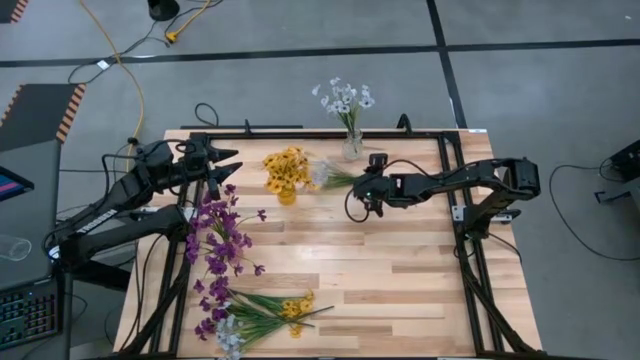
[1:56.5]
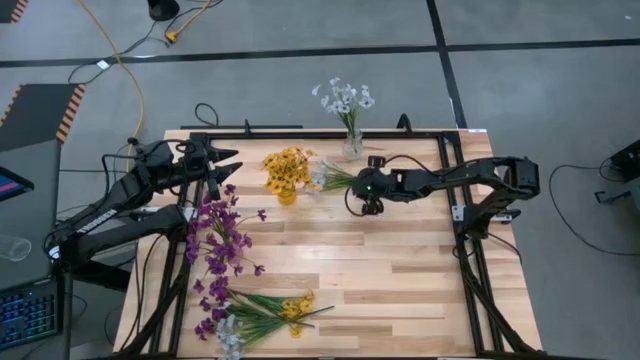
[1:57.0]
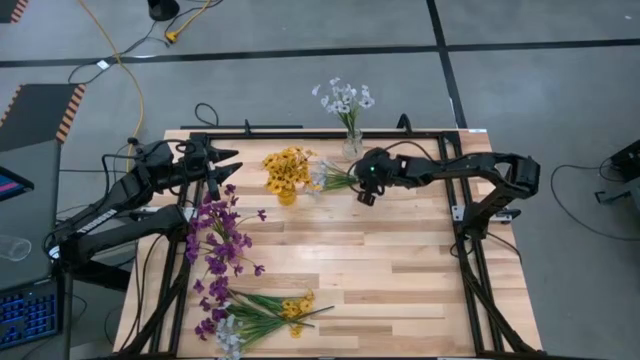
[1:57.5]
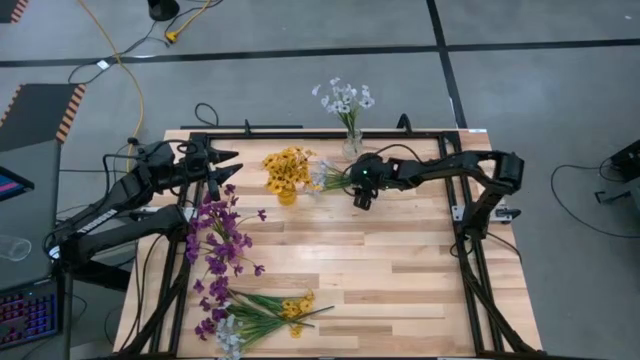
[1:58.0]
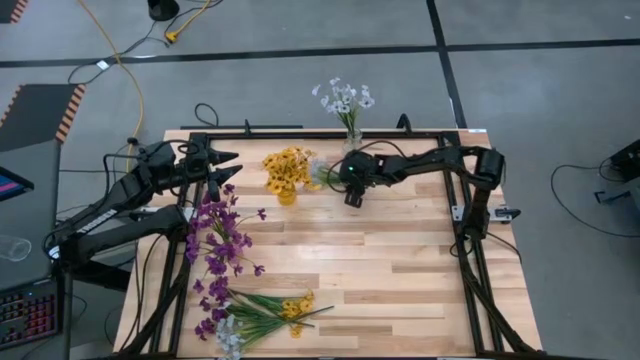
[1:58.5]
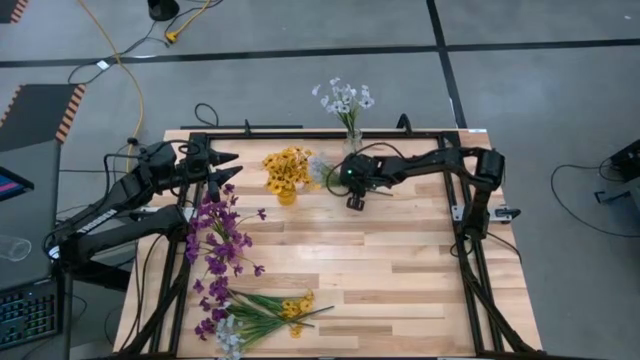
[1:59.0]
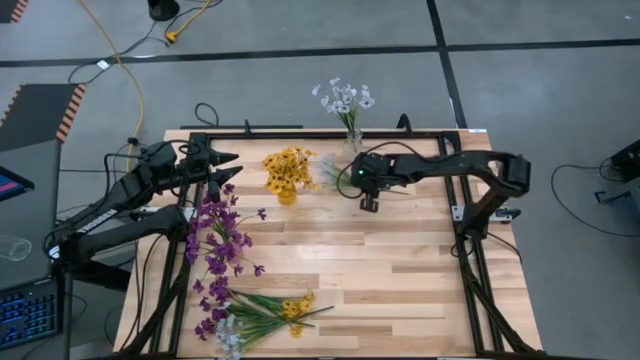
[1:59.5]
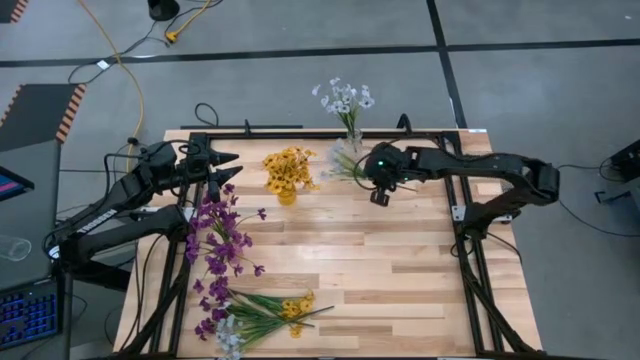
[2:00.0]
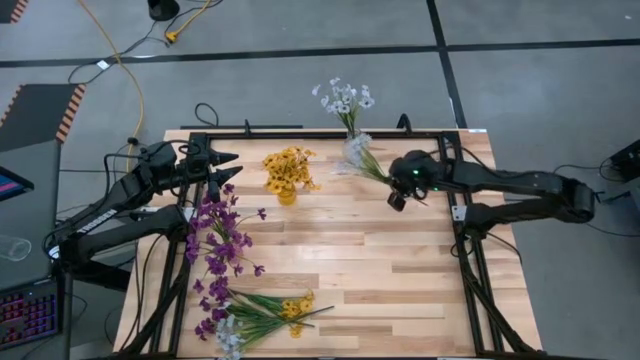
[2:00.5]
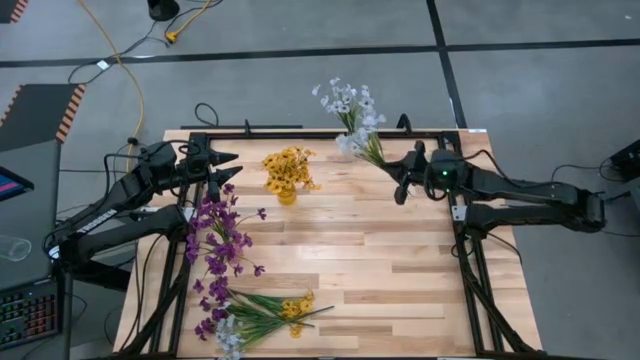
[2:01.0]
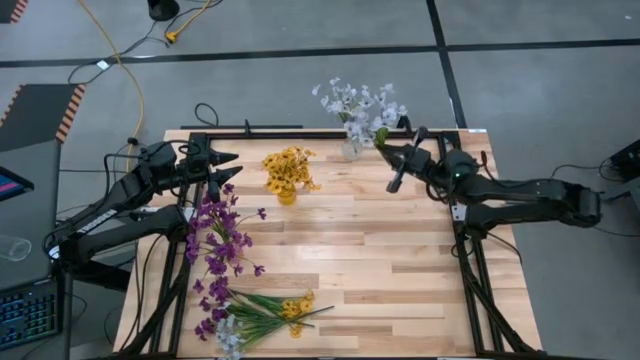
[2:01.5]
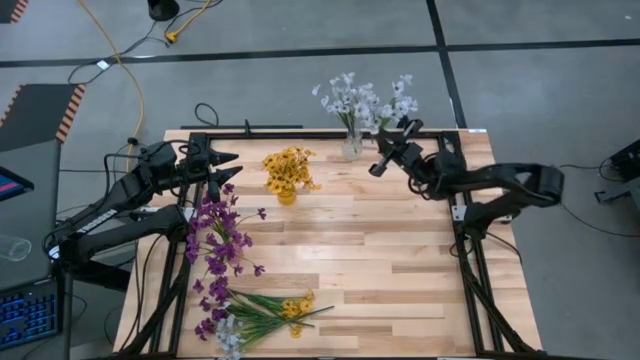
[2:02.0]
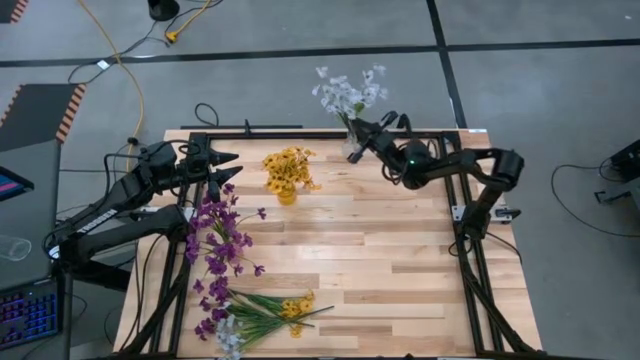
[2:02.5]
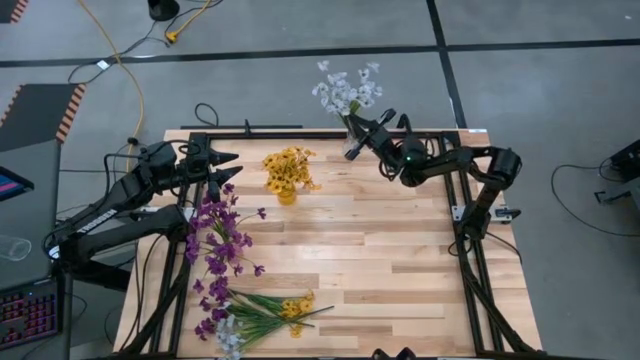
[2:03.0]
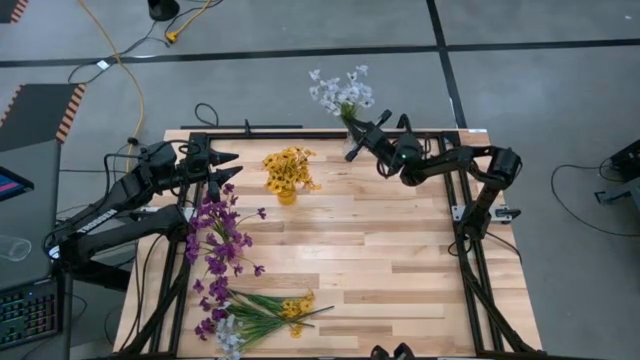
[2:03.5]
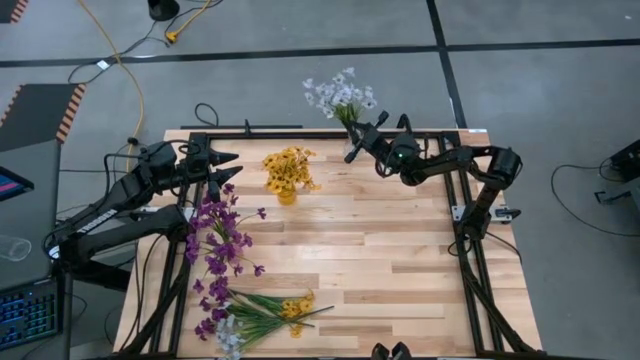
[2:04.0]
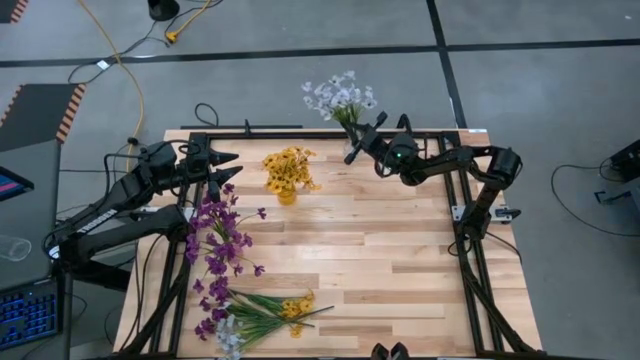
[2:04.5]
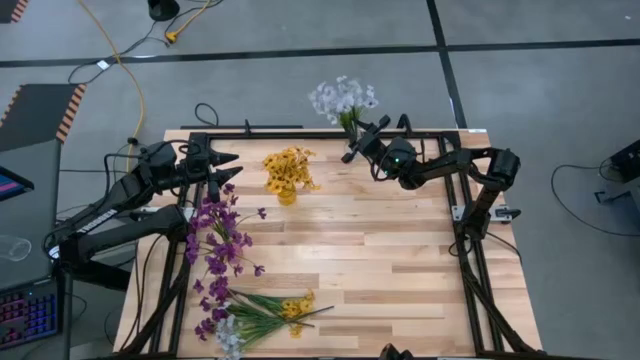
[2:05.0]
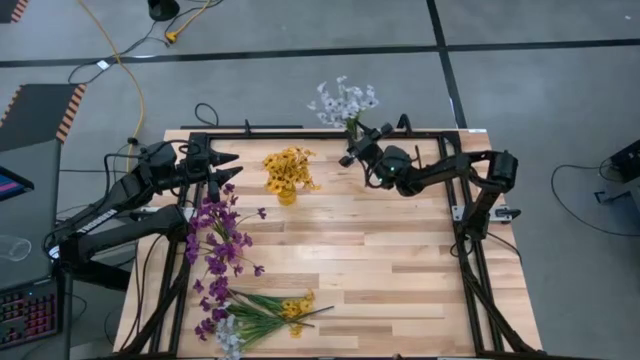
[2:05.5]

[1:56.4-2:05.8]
Task: Sort flowers into vase by color
Put the top white flowers into the transparent vase

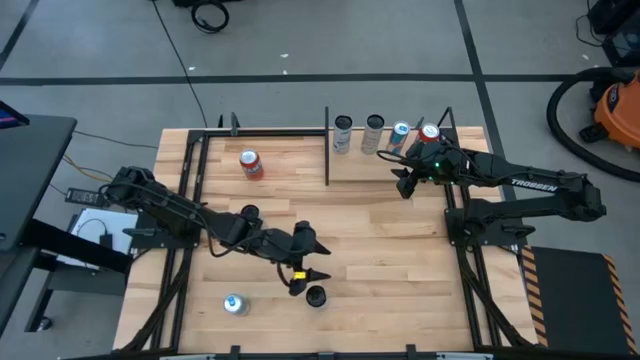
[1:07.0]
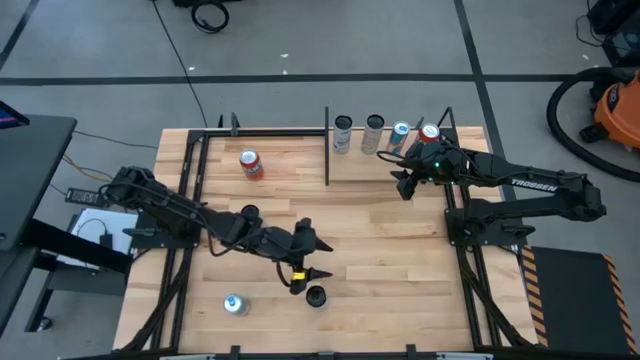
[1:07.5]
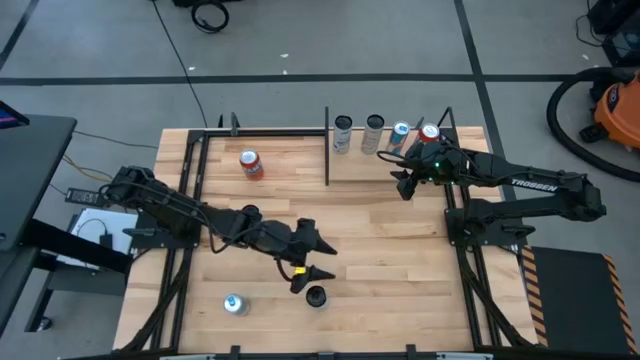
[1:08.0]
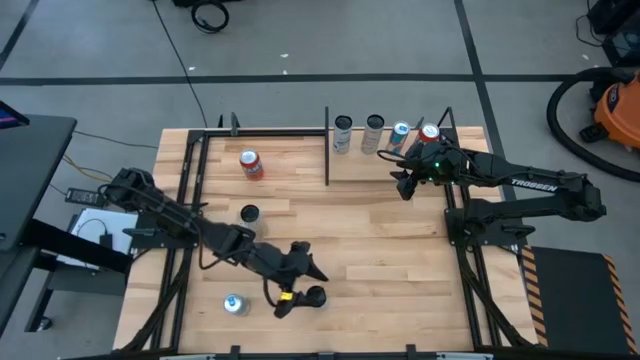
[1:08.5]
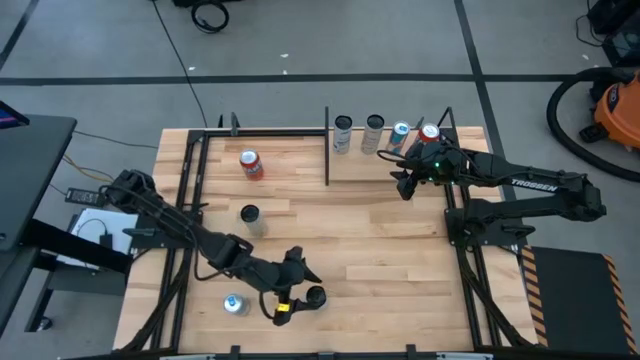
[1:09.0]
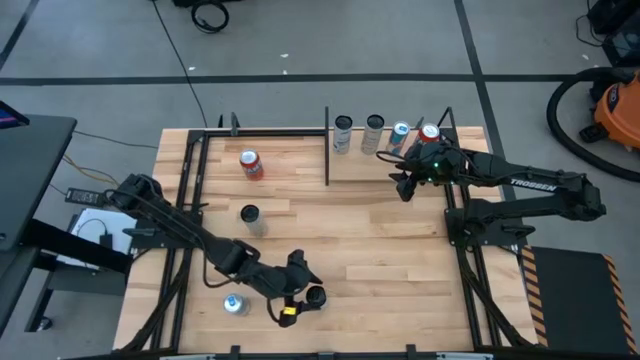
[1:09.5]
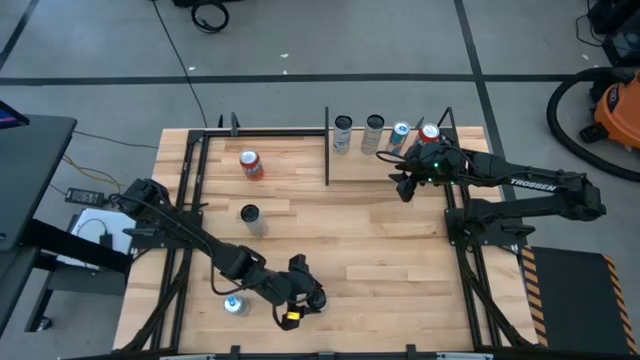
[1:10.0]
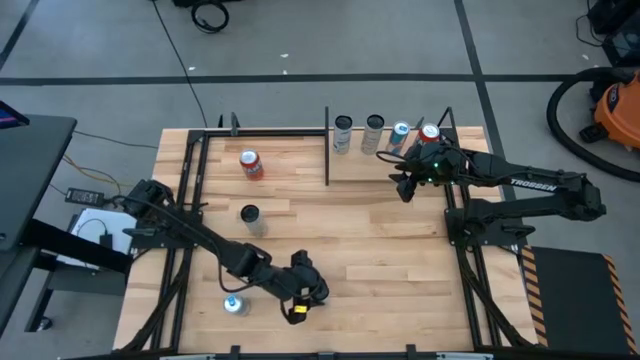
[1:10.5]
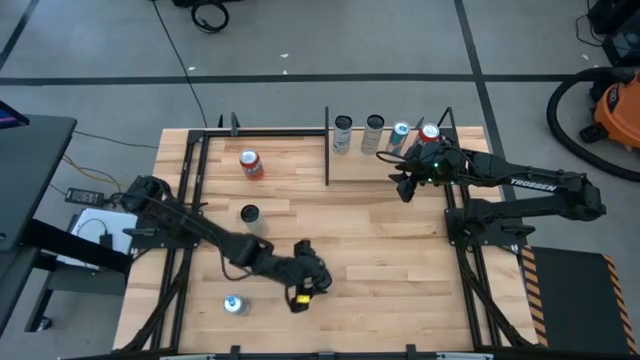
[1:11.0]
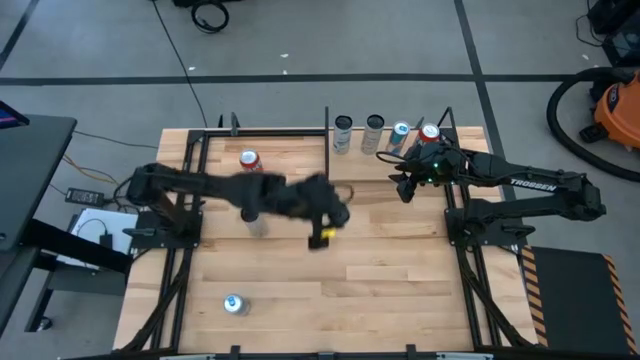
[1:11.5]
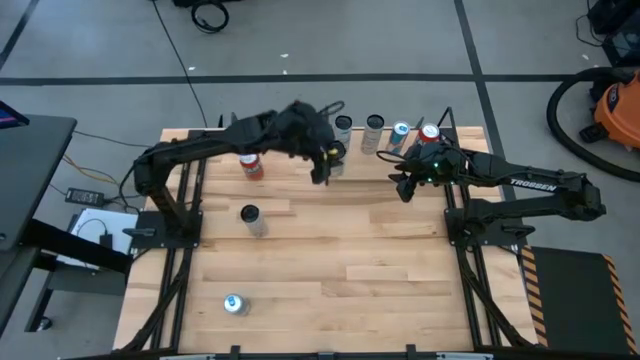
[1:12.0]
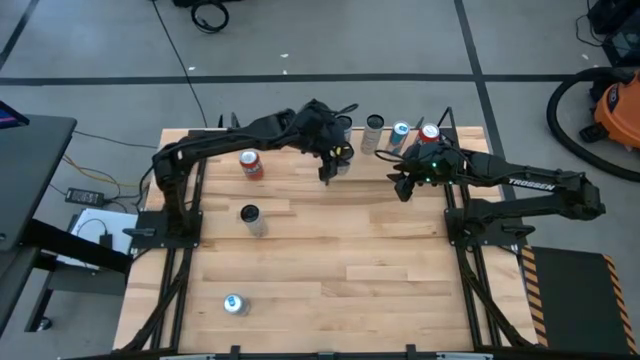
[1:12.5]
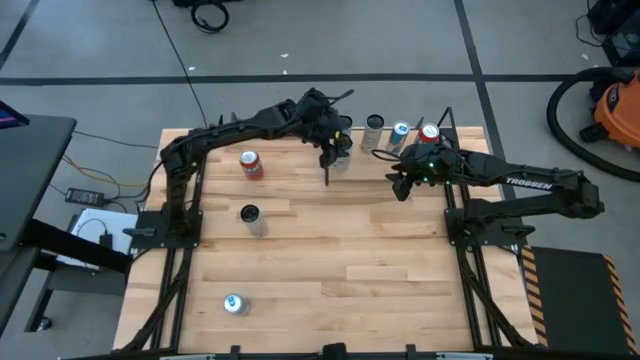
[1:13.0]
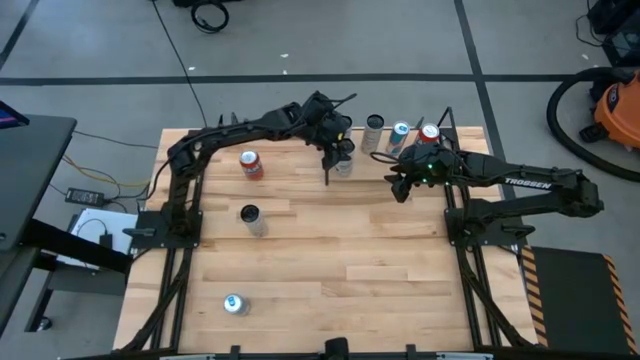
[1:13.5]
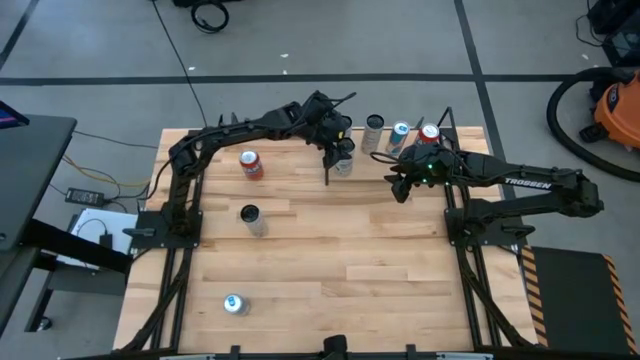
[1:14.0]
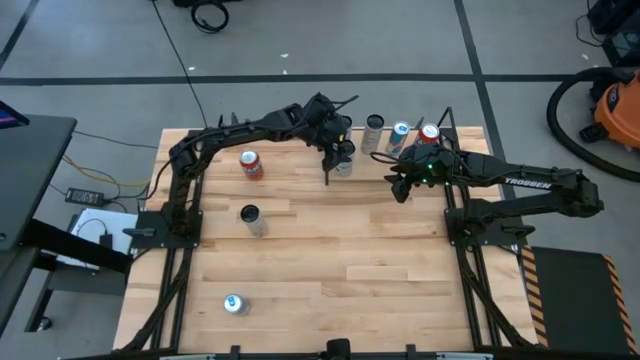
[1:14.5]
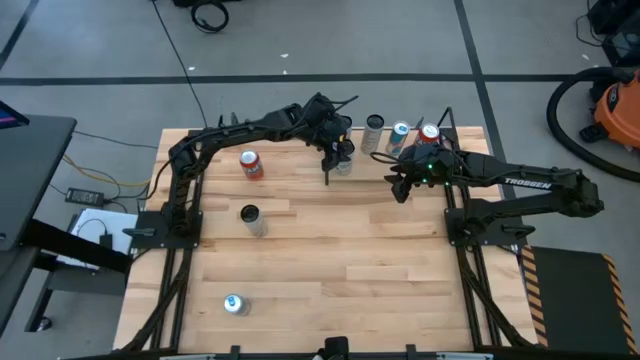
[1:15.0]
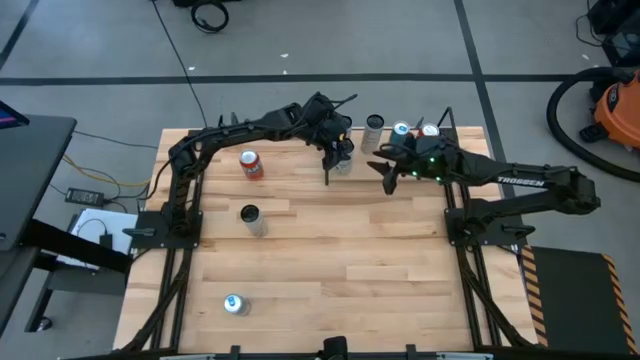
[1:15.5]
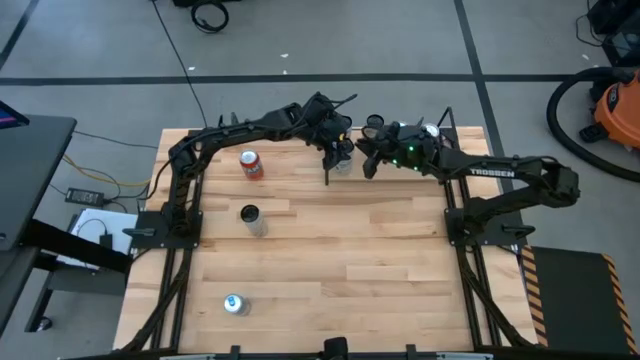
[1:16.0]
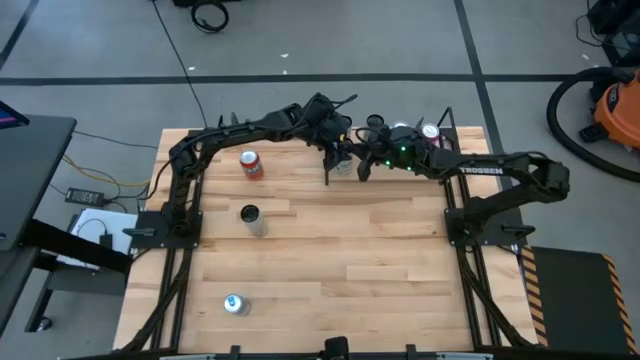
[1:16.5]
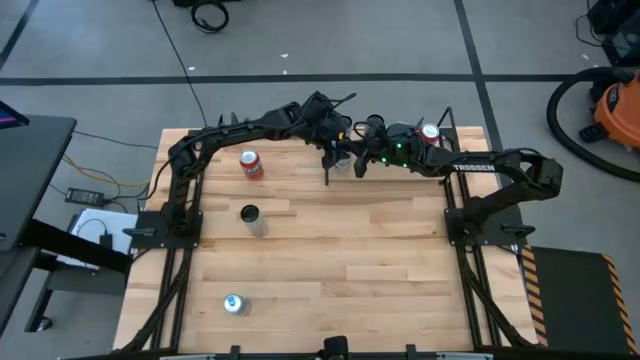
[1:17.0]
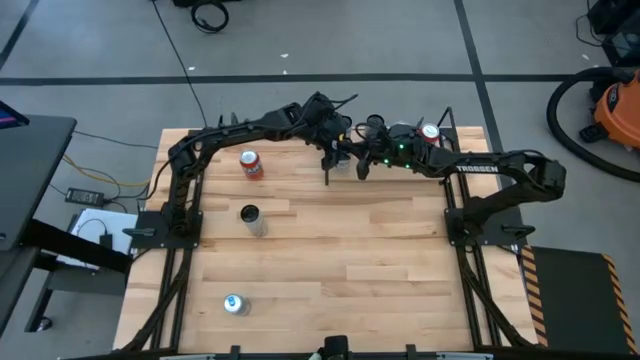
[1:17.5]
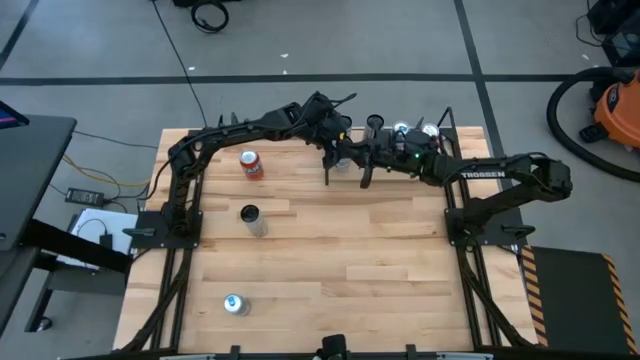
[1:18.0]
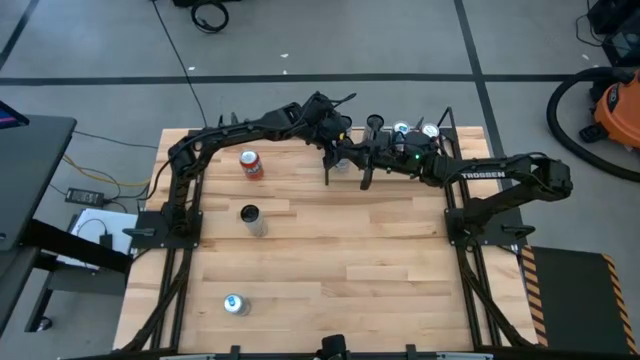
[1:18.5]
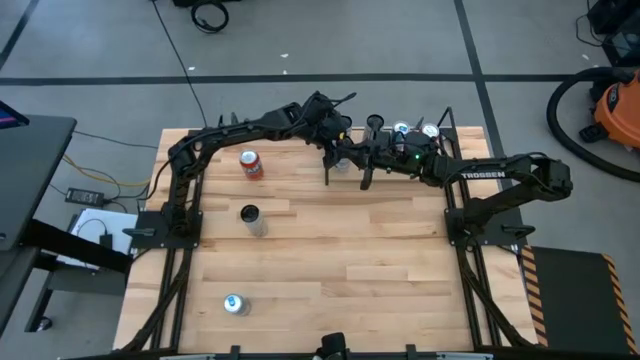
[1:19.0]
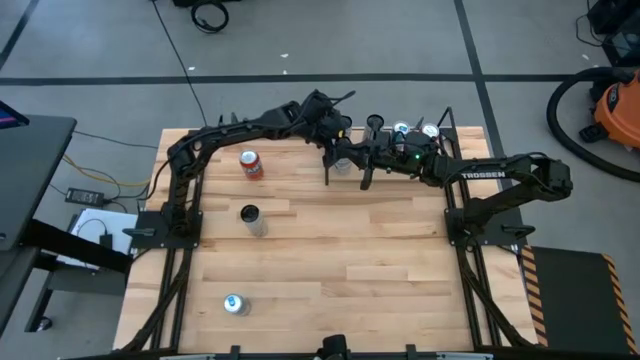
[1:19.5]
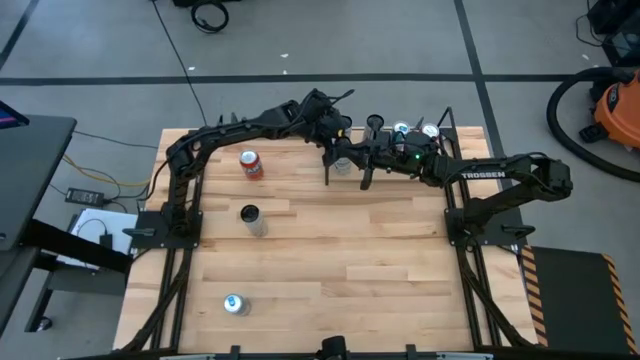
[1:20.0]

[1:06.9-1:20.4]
Task: Place canned beverage on shelf
Put the white blue soda can on the shelf aligned with the other blue white soda can
